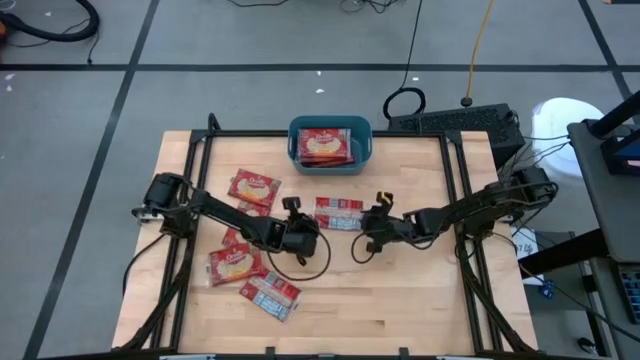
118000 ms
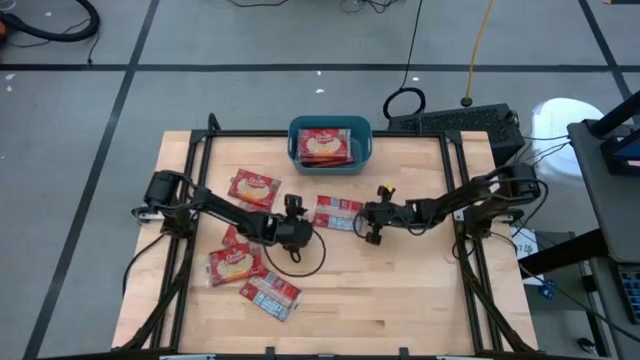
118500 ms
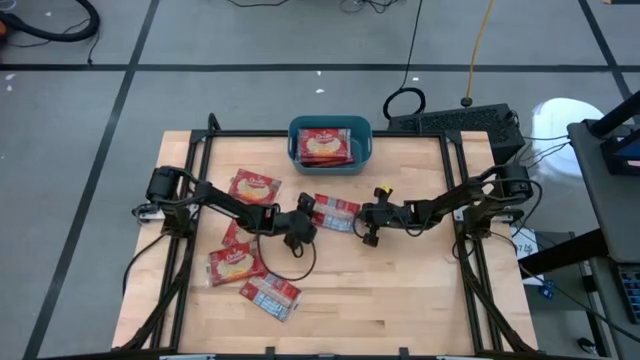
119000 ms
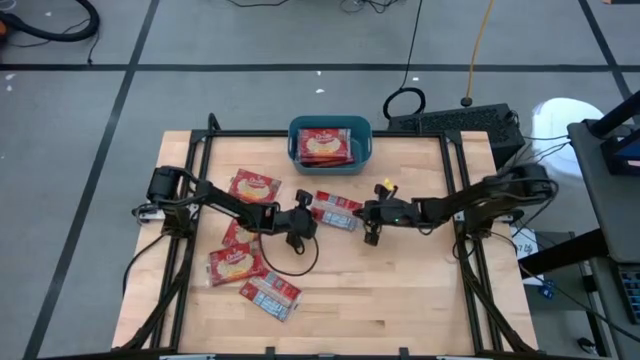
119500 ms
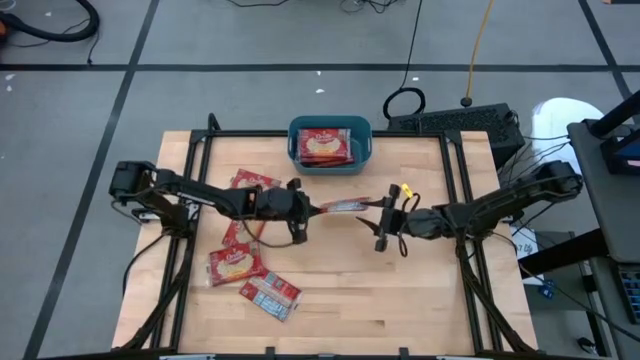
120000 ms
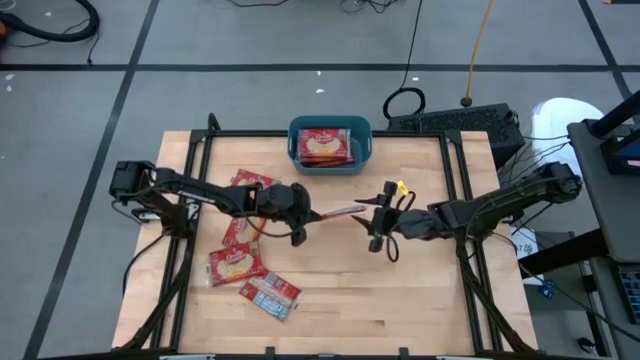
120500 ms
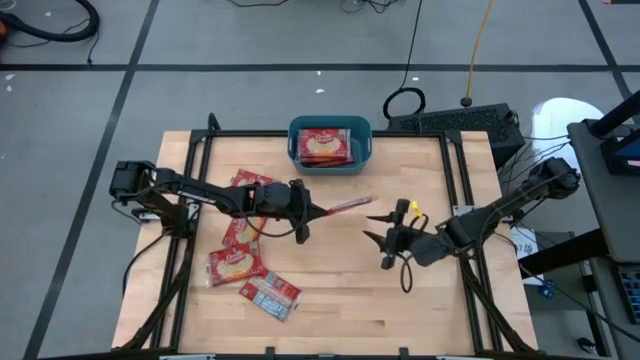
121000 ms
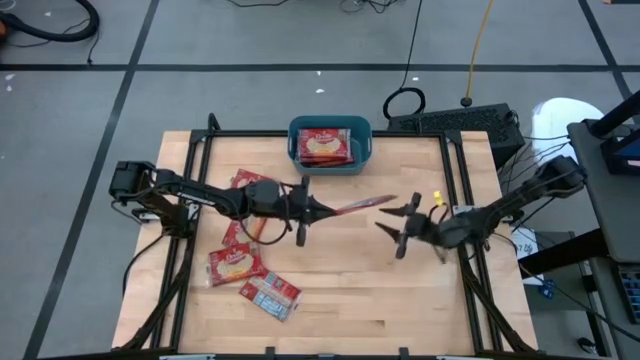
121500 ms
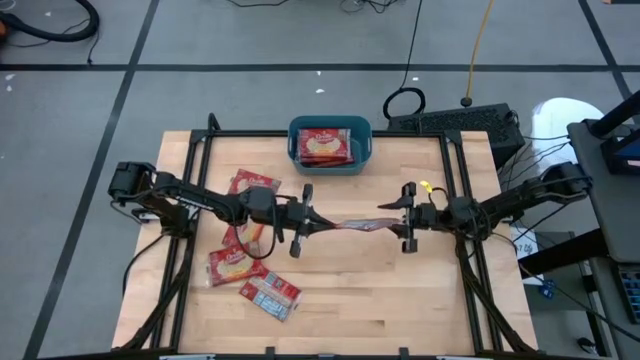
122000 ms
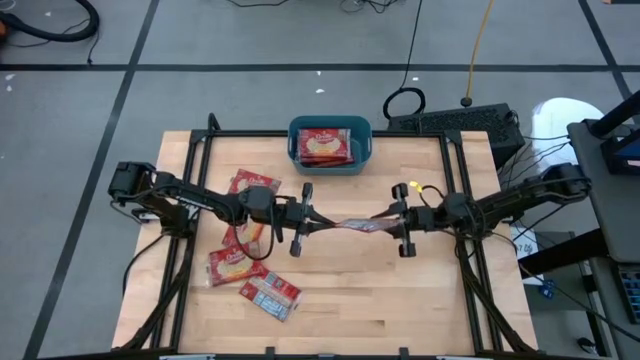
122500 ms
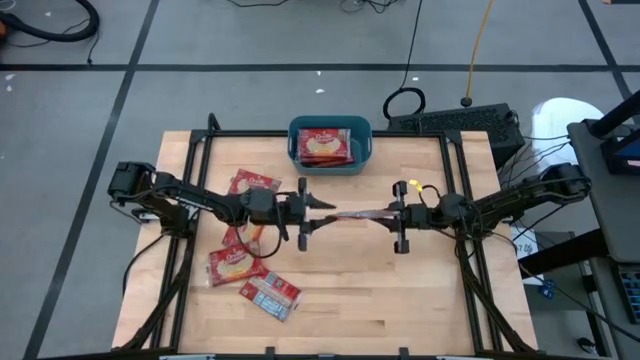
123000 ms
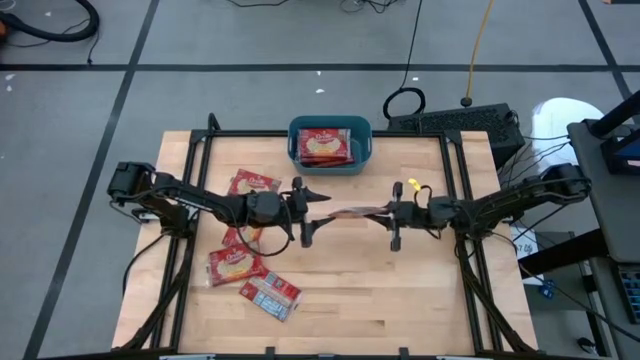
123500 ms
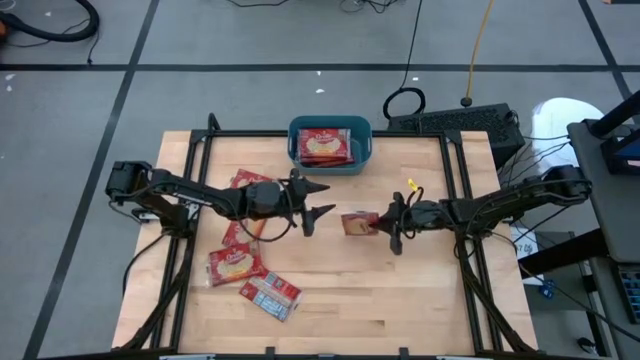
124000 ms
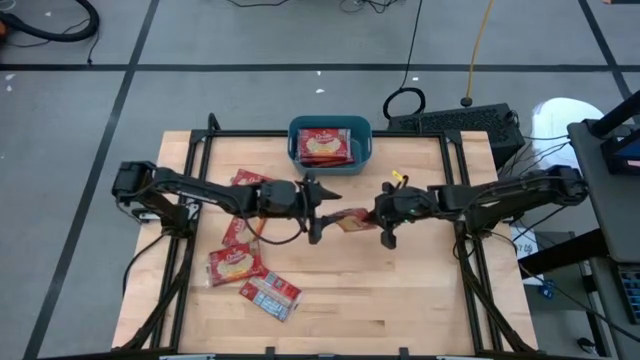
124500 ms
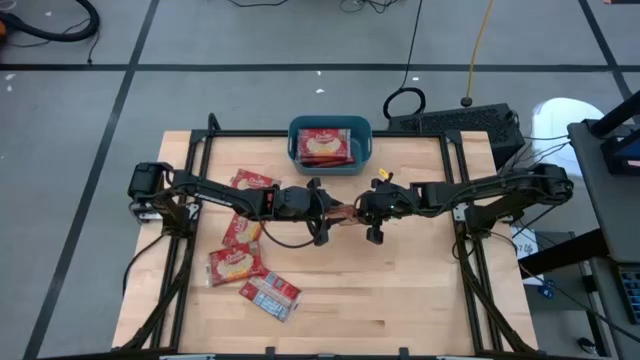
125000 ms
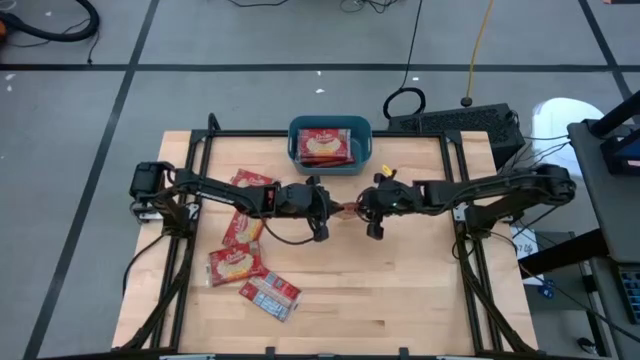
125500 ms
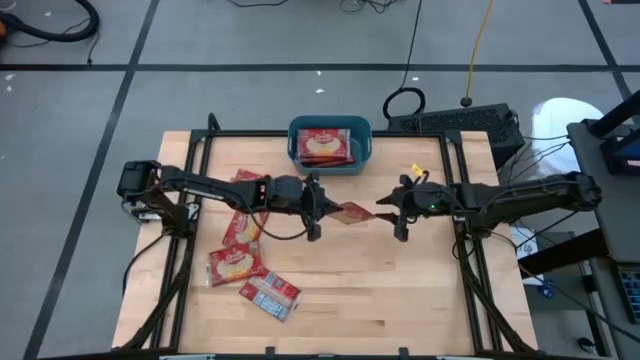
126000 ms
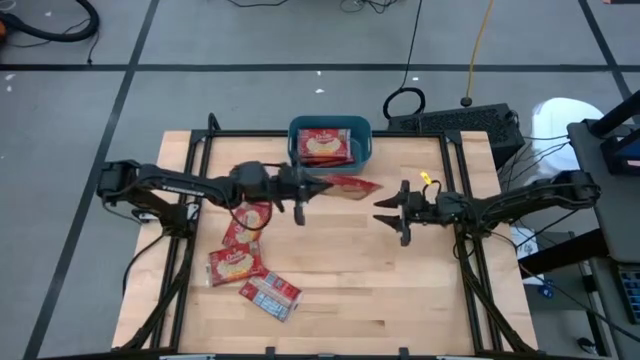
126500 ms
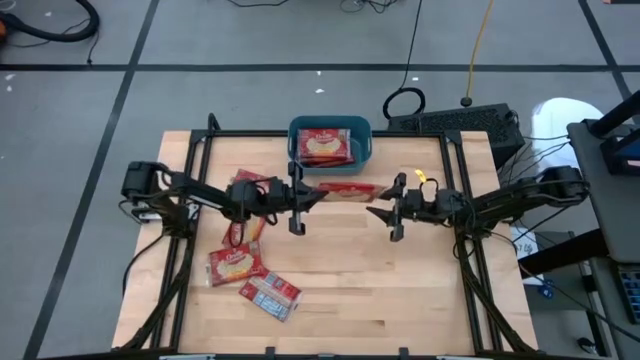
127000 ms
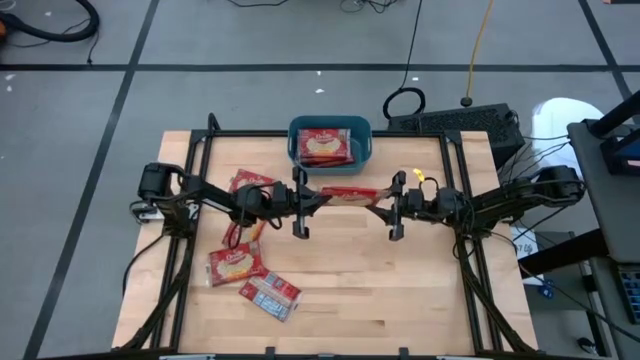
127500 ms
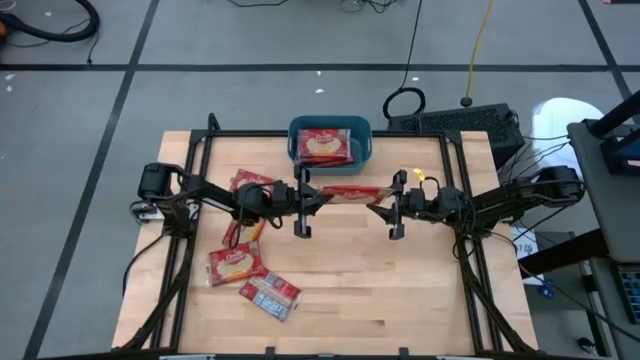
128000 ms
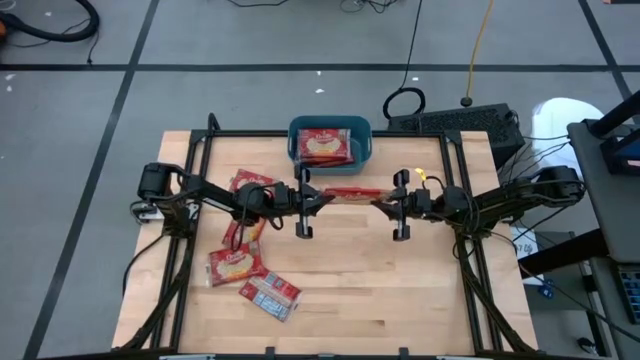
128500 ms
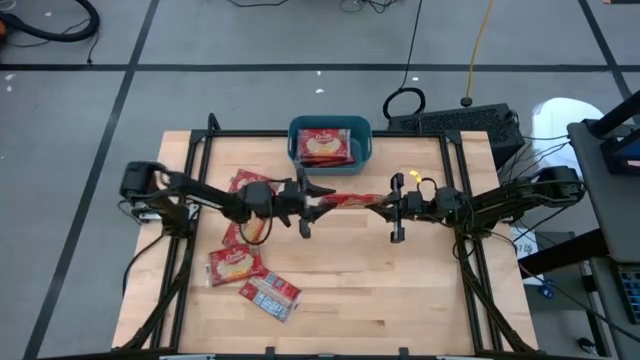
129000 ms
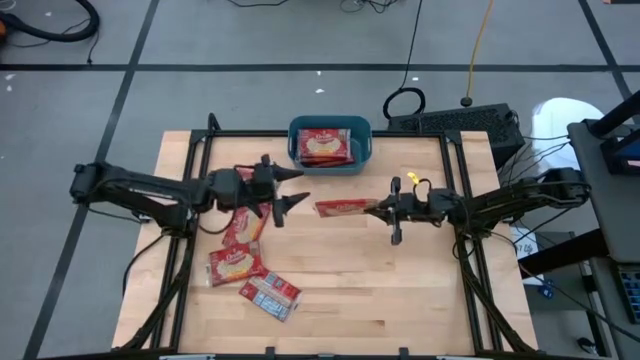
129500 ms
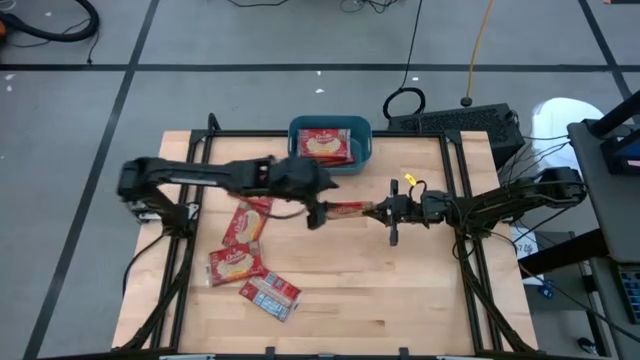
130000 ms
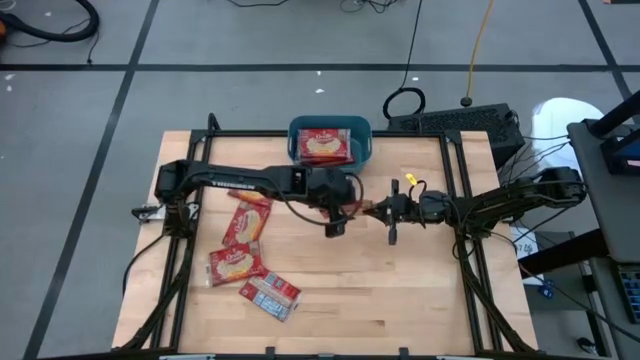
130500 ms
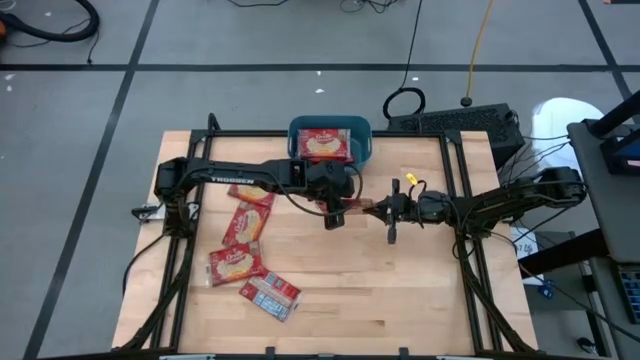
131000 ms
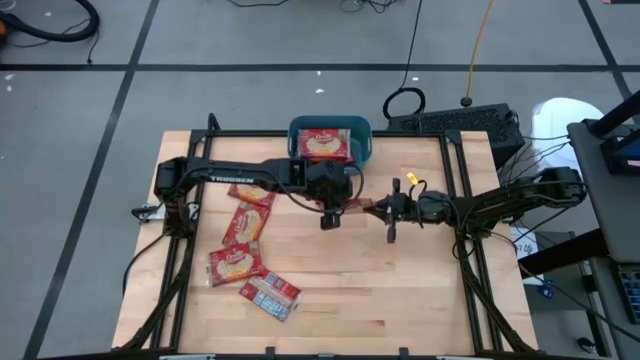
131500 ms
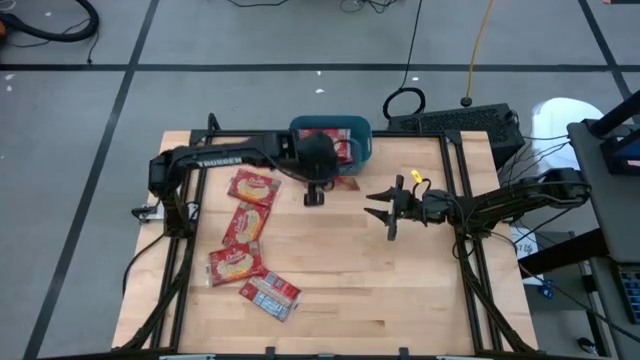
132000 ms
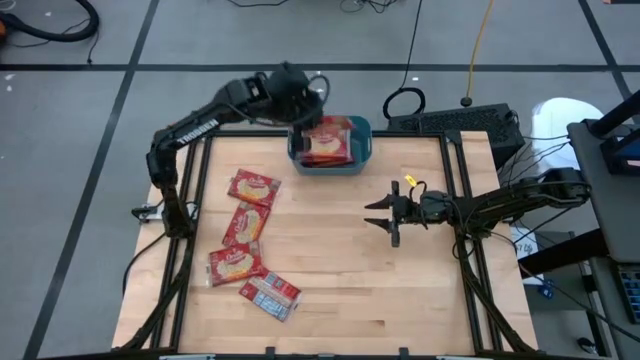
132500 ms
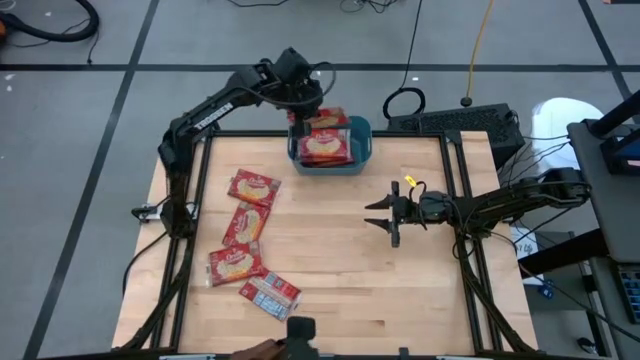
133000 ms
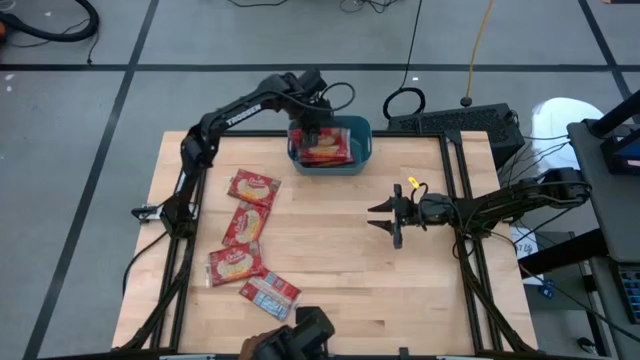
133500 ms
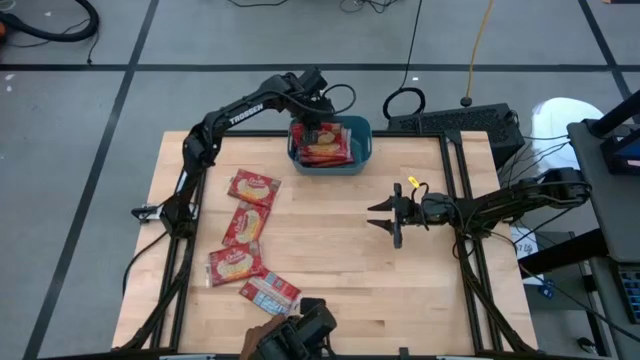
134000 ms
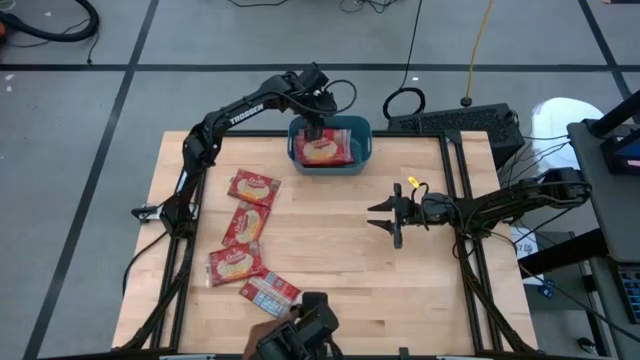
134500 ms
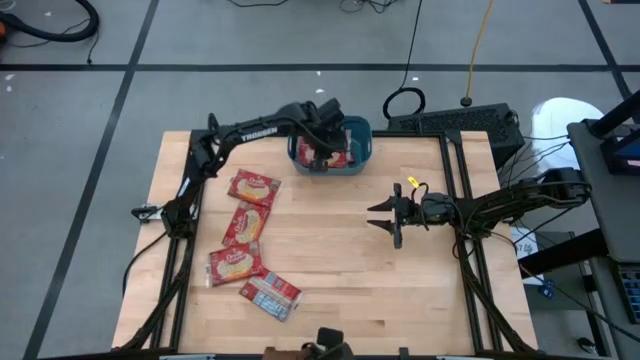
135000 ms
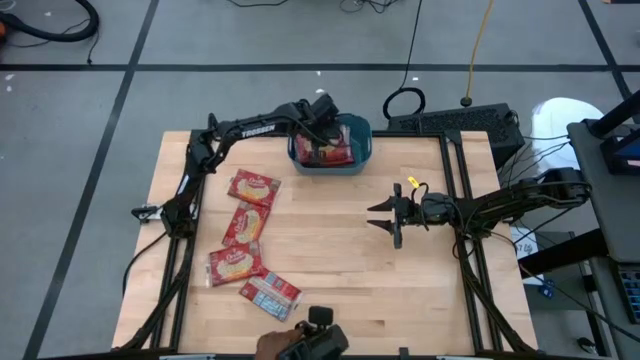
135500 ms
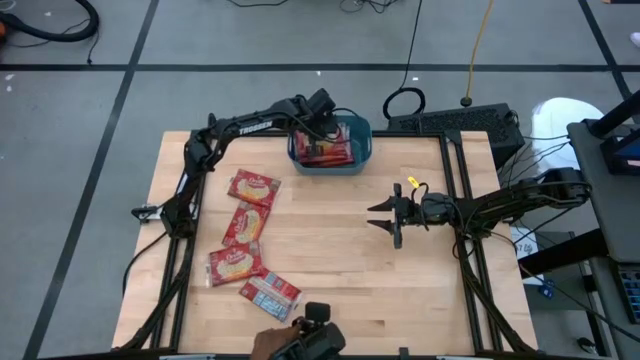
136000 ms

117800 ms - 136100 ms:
Task: Sort popcorn bags into baskets
Put the red popcorn bag into the blue bin

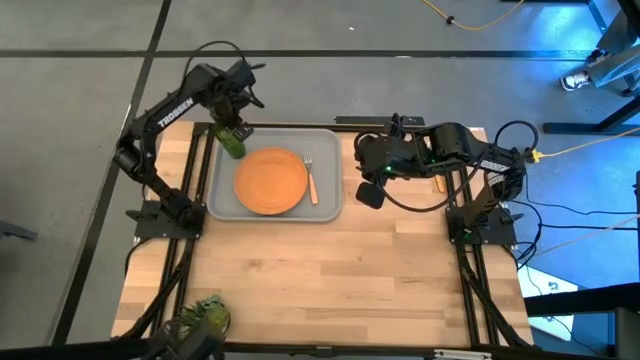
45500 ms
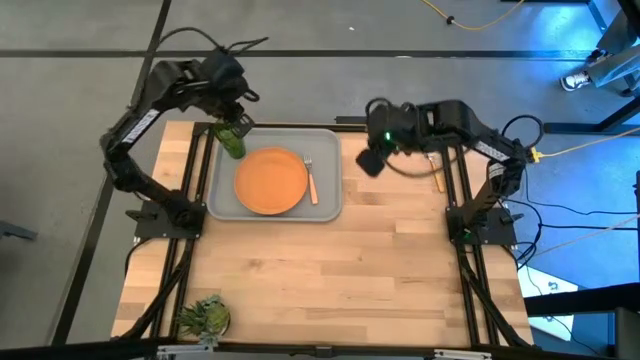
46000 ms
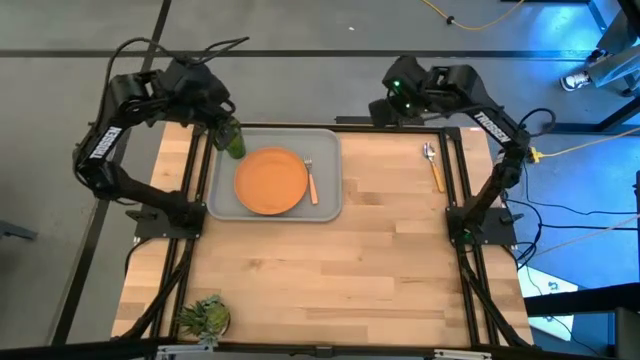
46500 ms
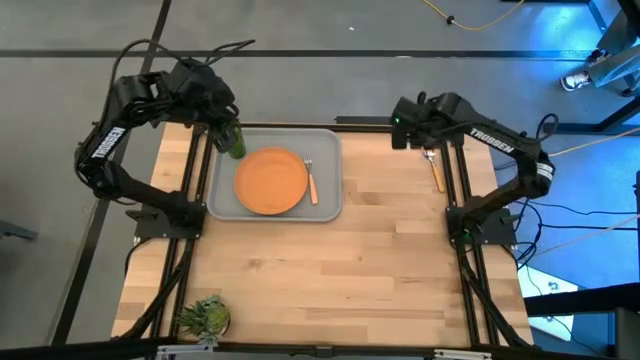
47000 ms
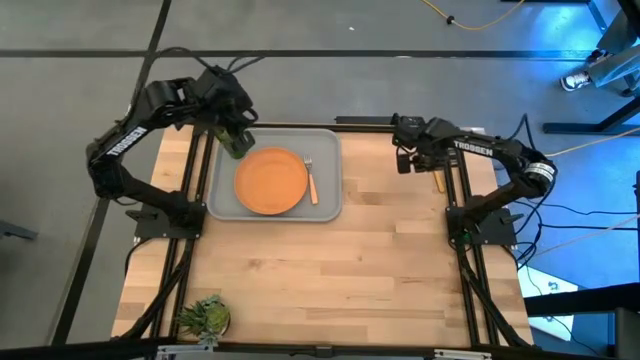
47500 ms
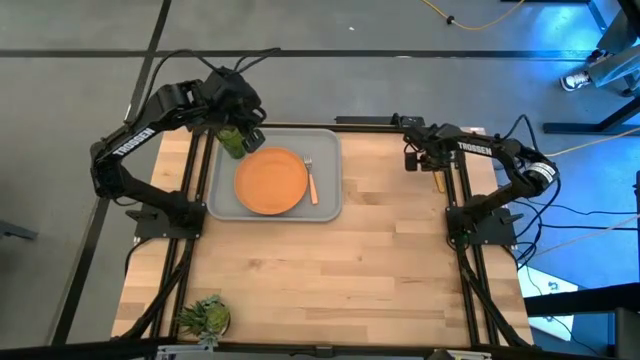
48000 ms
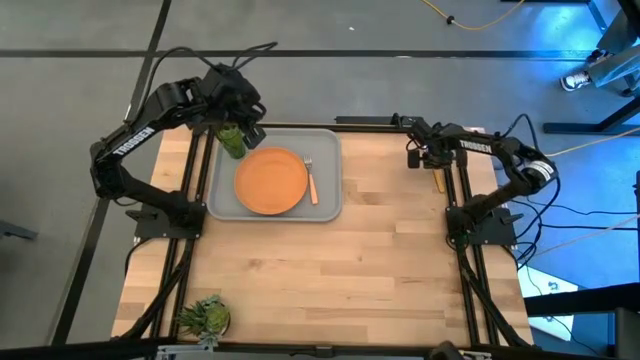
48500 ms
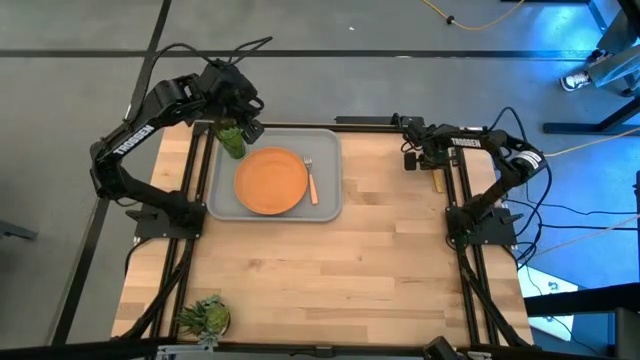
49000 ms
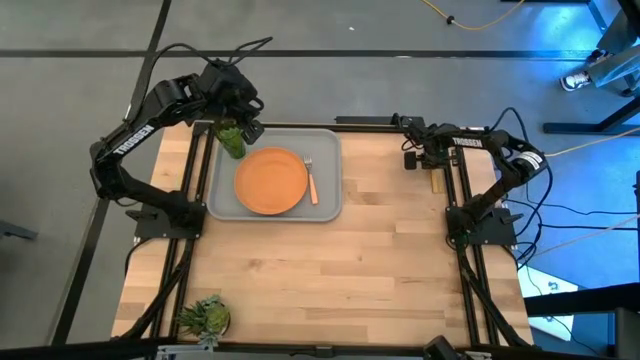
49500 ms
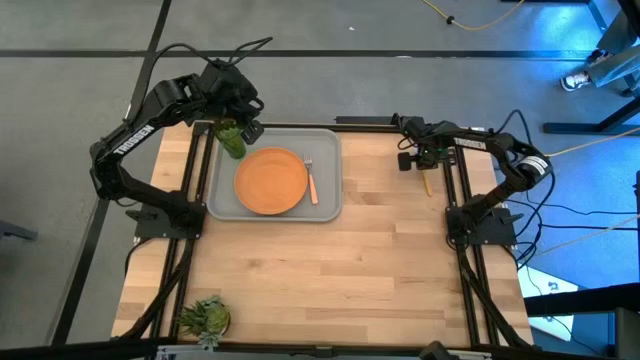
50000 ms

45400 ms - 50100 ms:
Task: Pick and place plate/cup/fork/spoon on tray
Put the orange spoon on the gray serving tray to the right side of the orange fork
